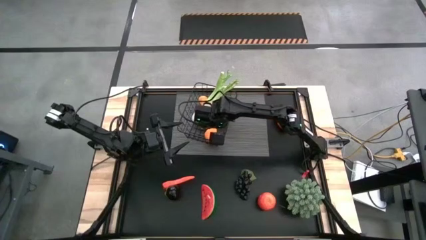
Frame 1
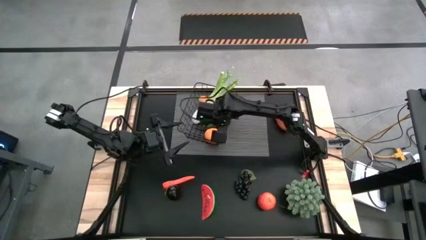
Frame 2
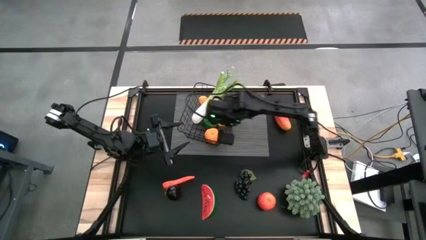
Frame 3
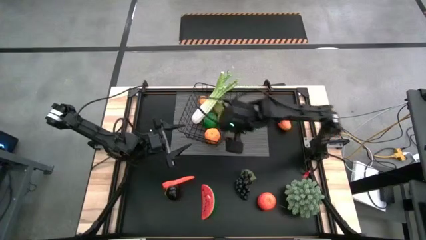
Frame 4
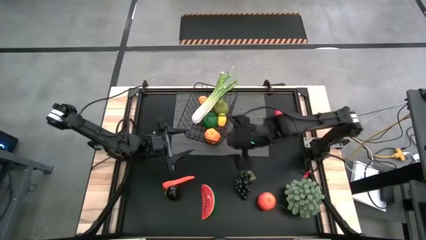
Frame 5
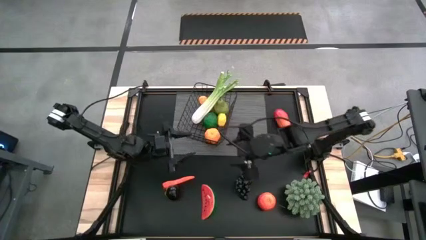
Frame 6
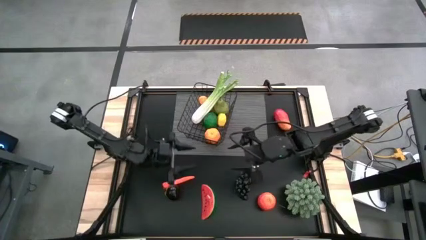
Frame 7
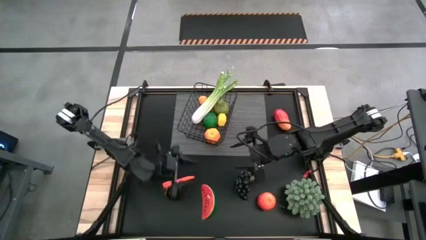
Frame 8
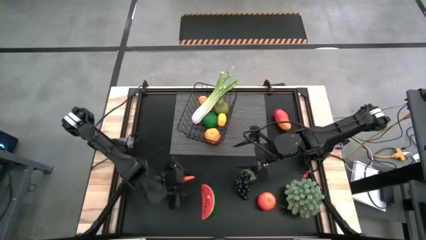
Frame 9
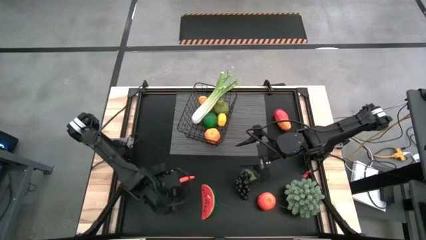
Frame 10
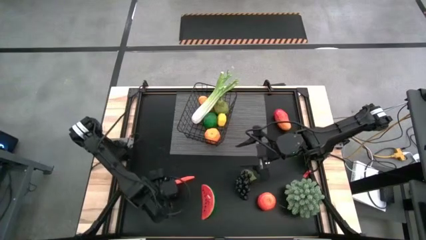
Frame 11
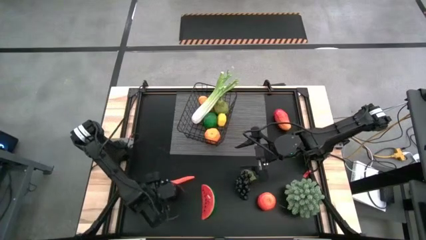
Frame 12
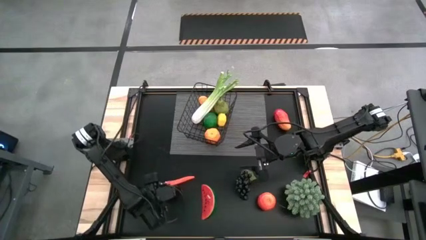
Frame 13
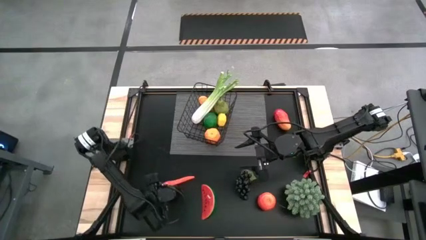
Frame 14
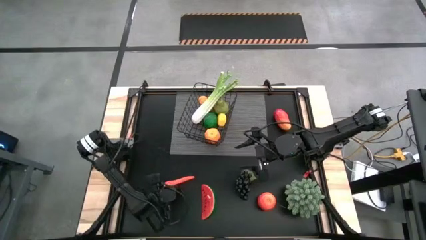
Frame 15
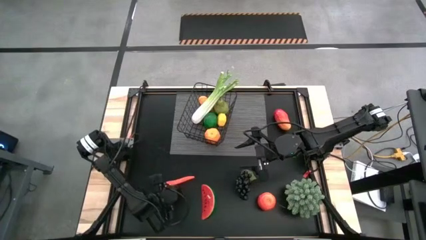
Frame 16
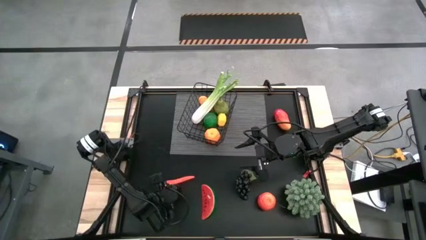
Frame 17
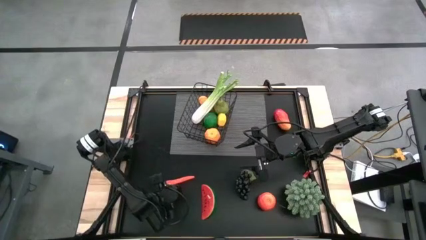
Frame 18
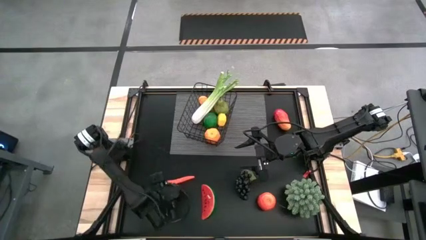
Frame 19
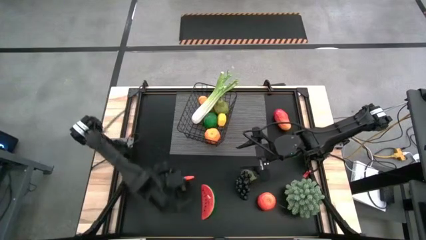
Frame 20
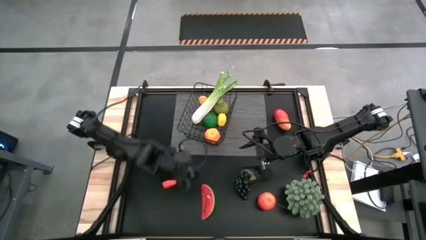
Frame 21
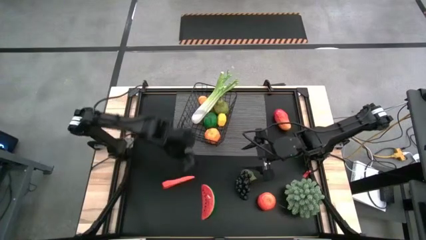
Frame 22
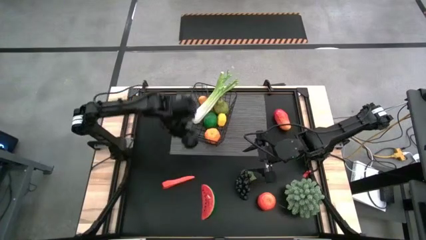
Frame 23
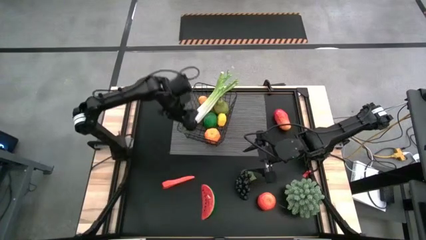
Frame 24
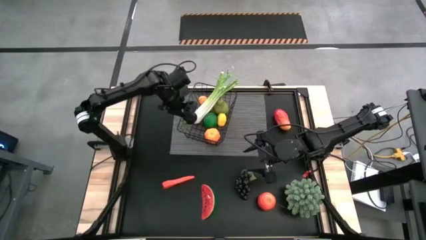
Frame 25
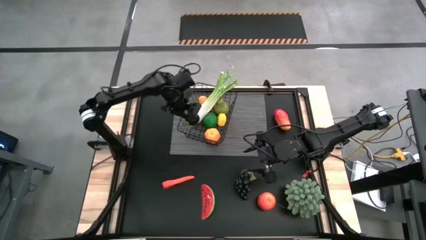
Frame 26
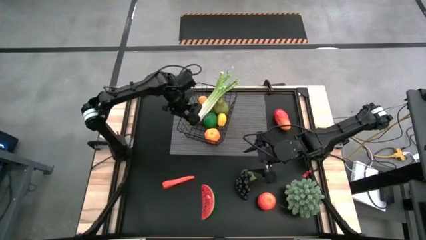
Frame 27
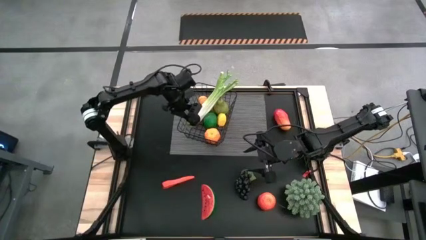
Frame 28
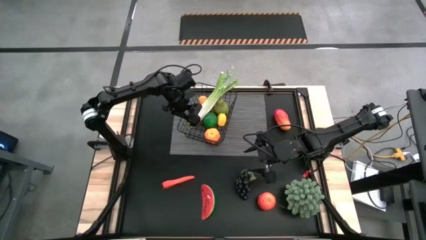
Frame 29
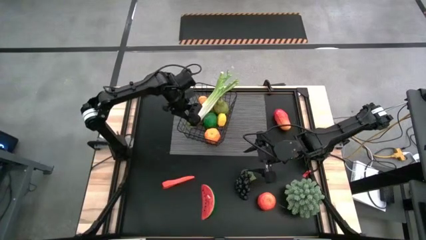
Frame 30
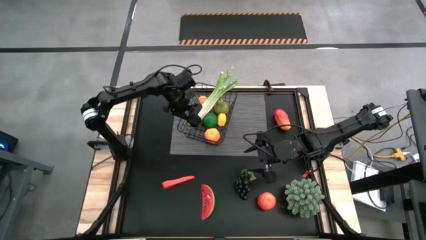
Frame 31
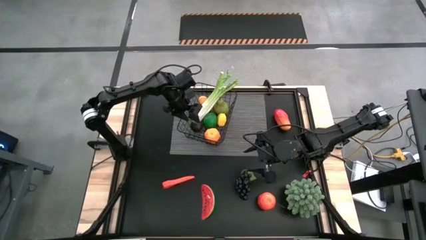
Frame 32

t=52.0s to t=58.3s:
Task: Build produce basket
Put the plum into the wire basket

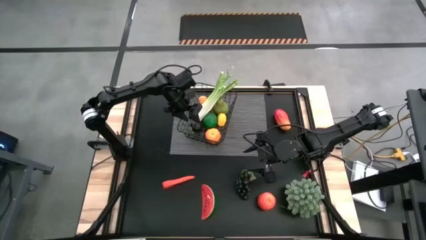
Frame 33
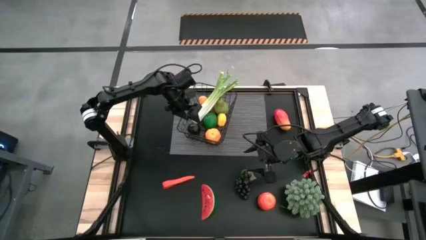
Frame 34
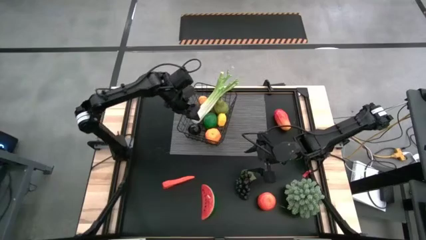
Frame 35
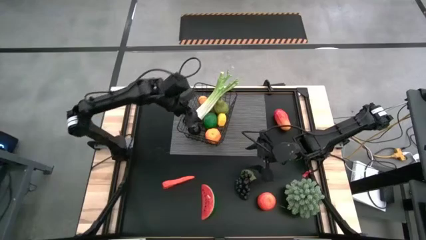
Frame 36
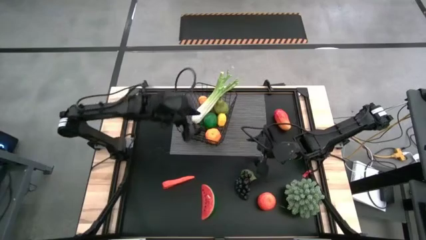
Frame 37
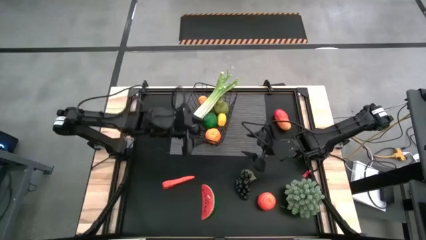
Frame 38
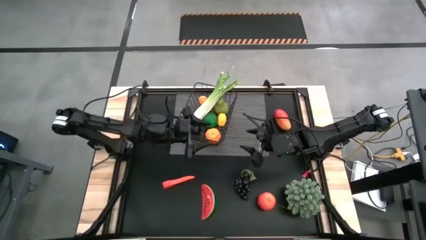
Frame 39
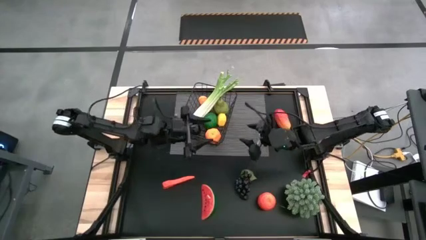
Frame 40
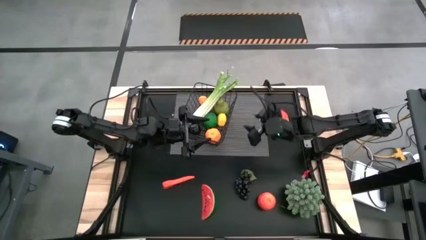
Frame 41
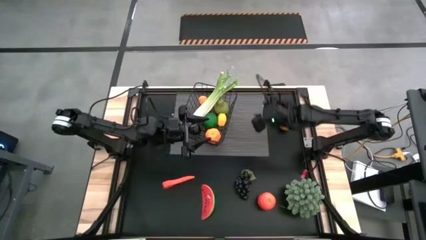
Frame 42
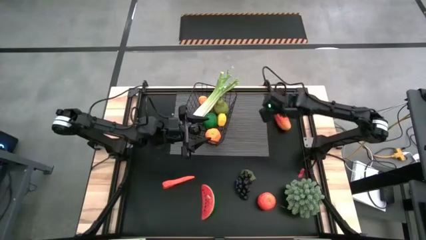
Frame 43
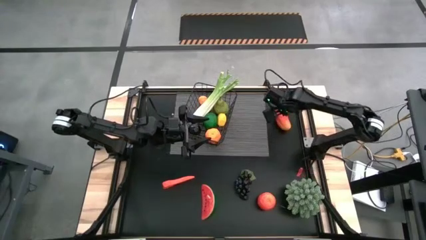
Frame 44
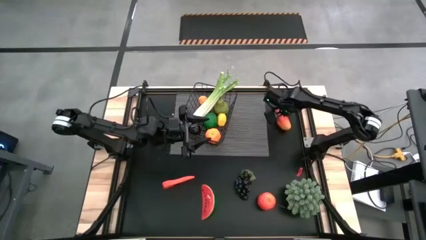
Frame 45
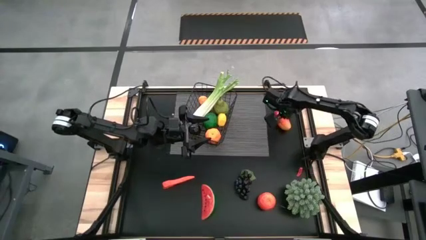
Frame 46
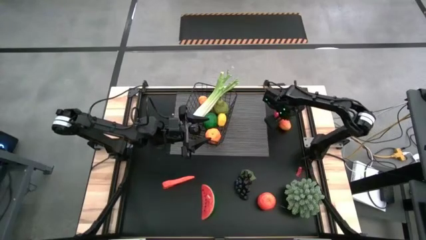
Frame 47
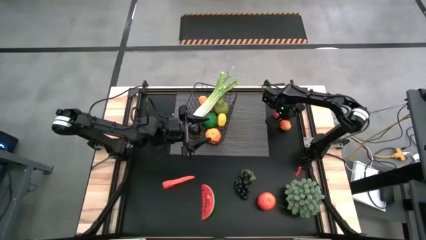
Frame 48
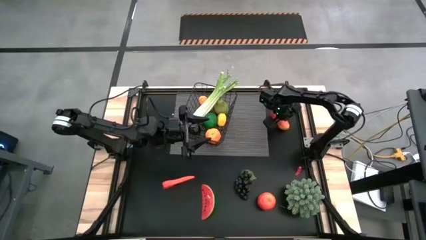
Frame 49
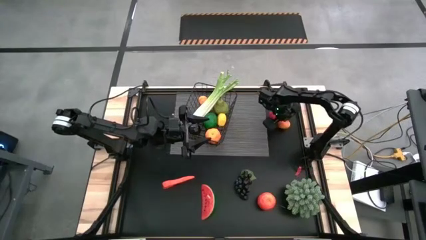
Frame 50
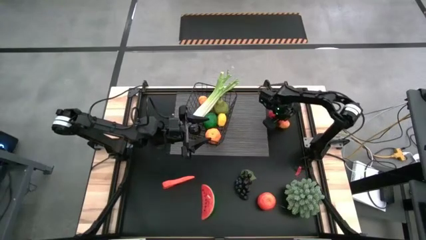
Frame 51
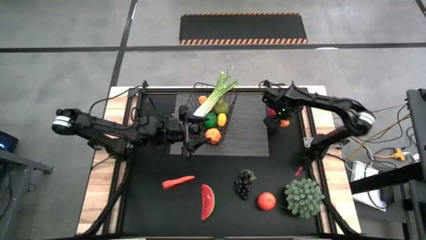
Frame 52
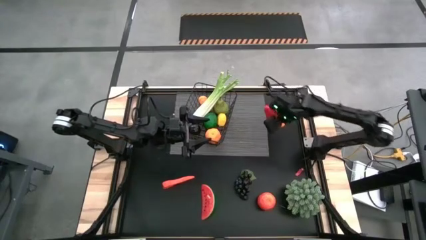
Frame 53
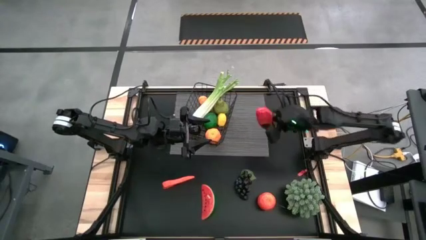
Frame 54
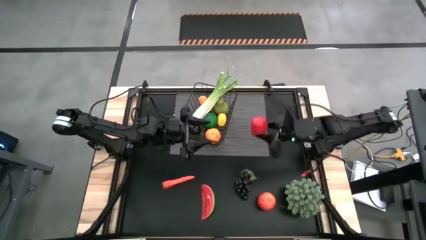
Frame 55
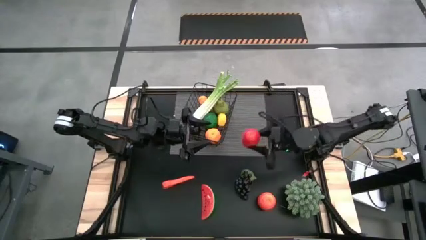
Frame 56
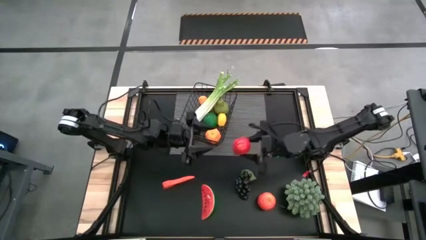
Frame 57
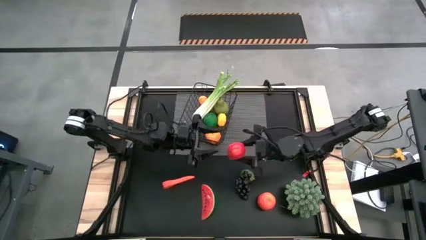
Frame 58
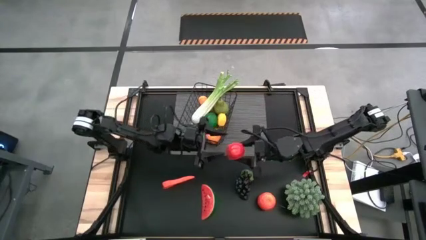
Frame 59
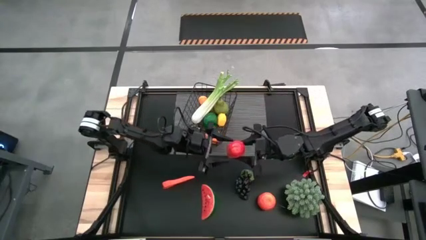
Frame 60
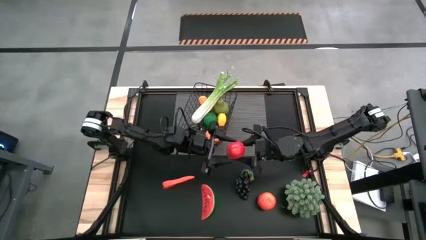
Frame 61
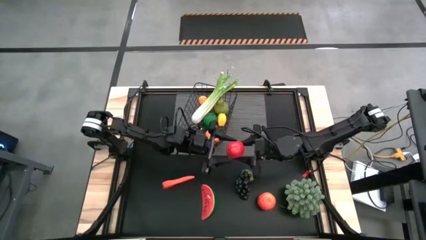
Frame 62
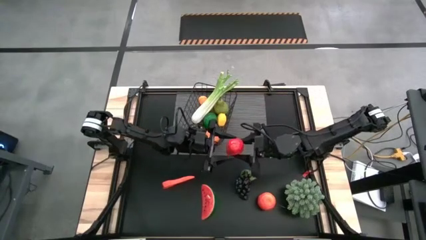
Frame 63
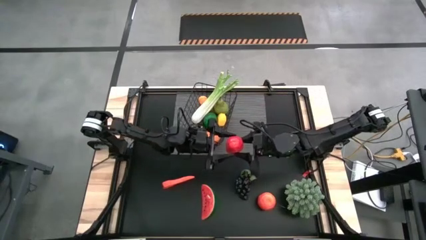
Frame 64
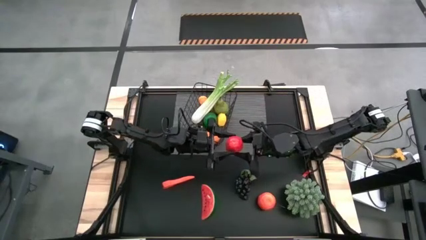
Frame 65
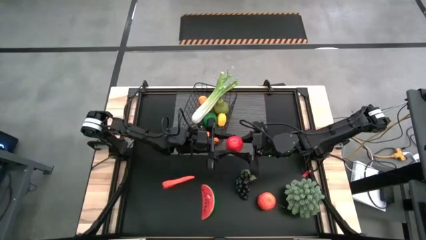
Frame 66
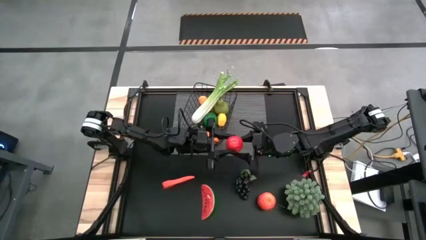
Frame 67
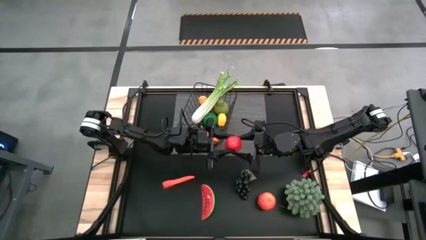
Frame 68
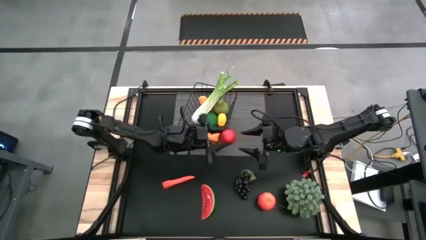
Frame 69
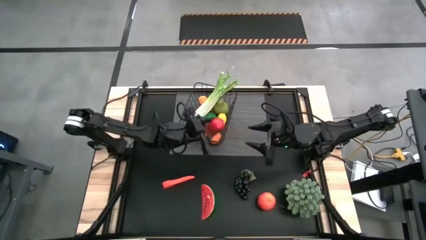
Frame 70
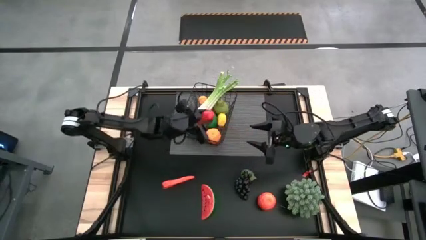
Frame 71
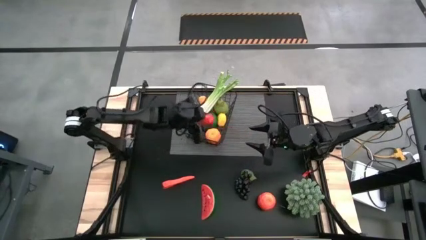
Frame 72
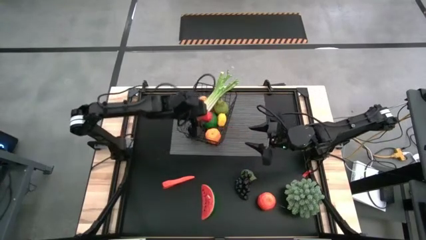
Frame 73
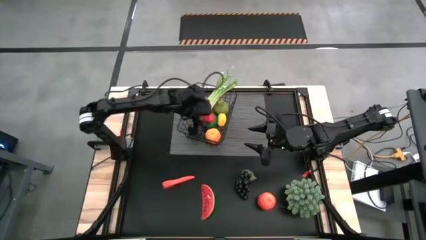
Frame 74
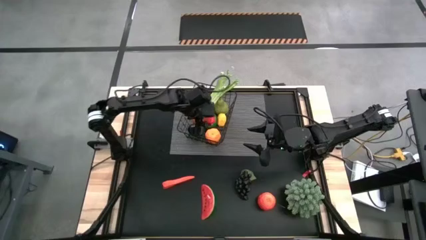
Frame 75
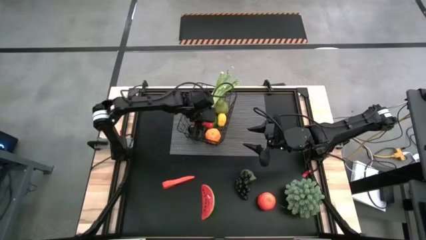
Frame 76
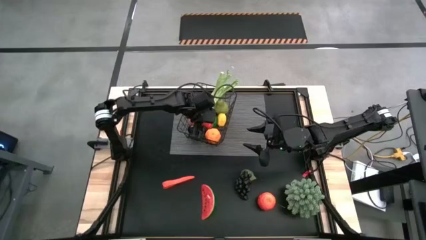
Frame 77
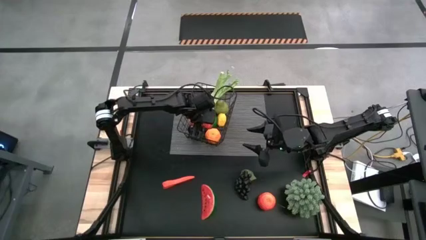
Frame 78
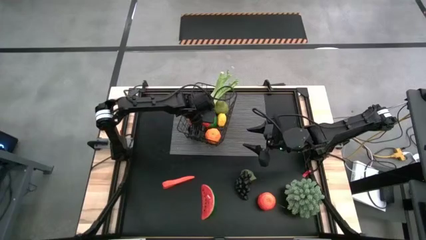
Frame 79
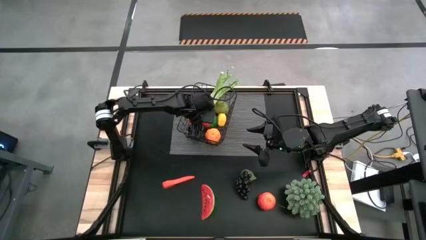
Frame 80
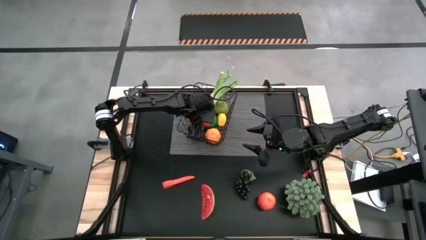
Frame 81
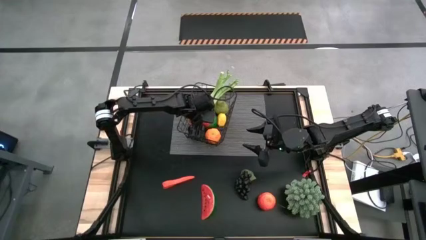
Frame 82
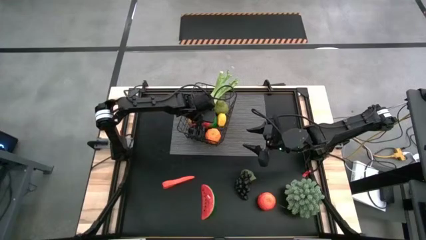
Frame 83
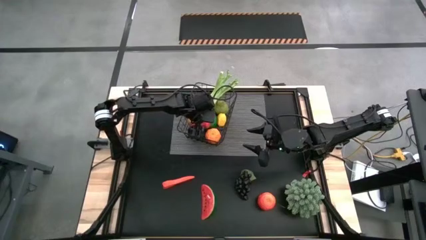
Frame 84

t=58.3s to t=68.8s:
Put the mango into the wire basket
